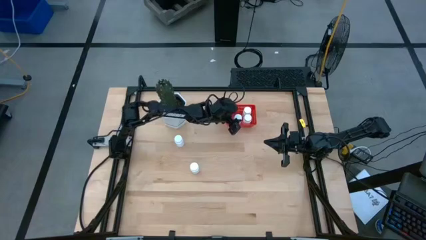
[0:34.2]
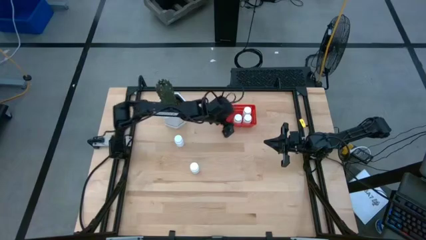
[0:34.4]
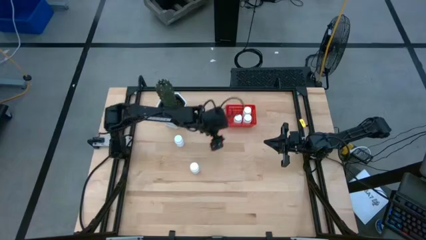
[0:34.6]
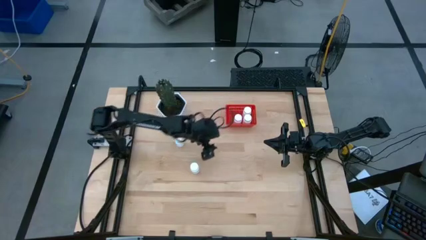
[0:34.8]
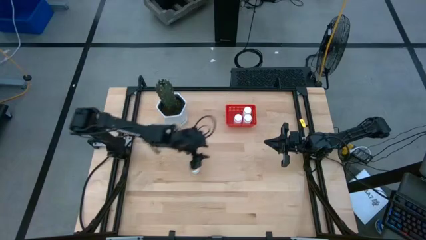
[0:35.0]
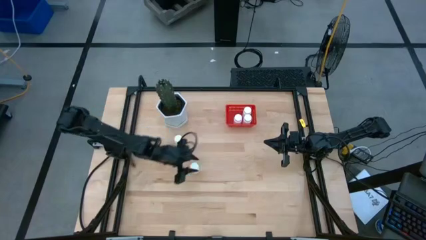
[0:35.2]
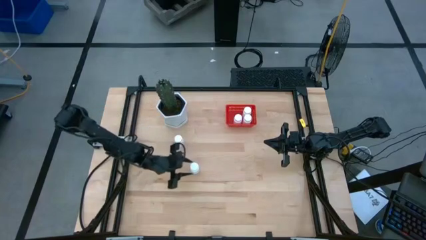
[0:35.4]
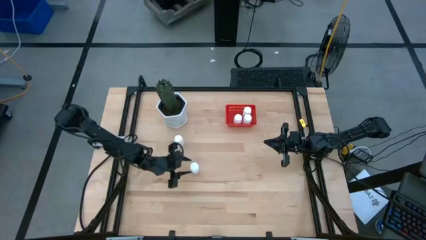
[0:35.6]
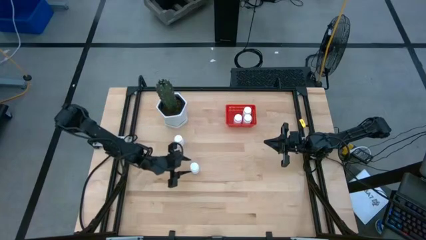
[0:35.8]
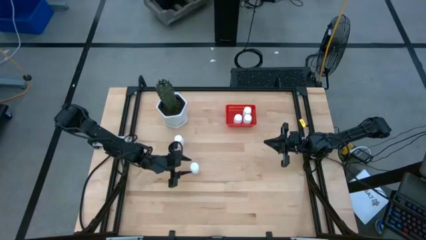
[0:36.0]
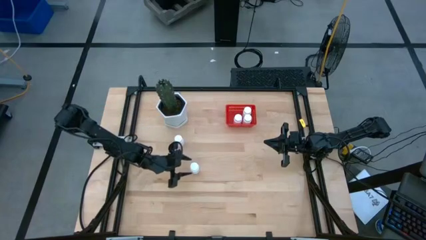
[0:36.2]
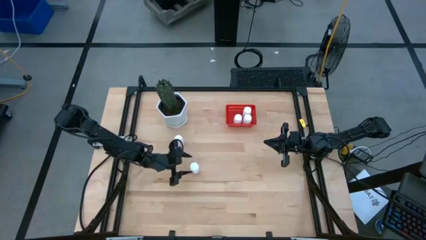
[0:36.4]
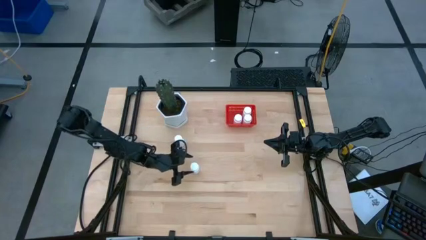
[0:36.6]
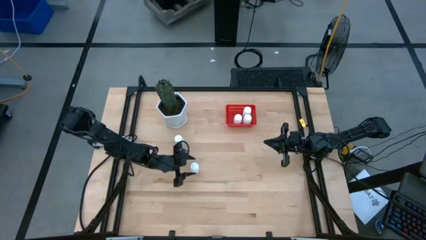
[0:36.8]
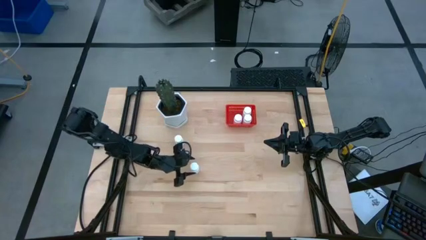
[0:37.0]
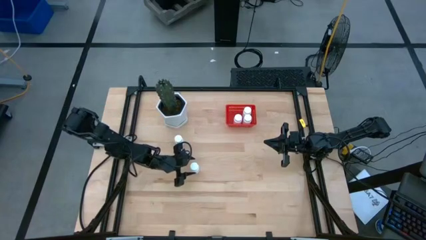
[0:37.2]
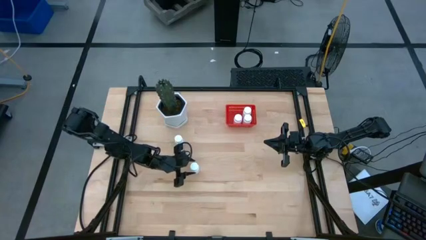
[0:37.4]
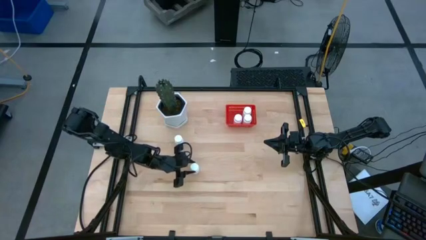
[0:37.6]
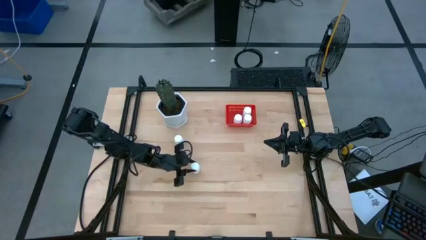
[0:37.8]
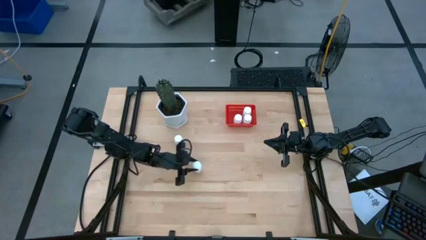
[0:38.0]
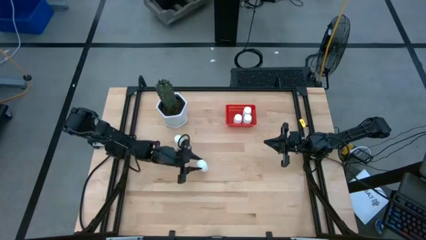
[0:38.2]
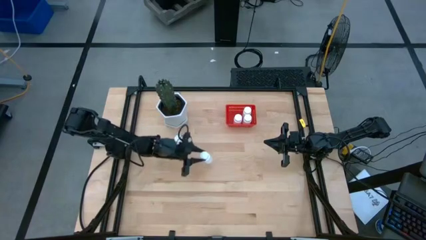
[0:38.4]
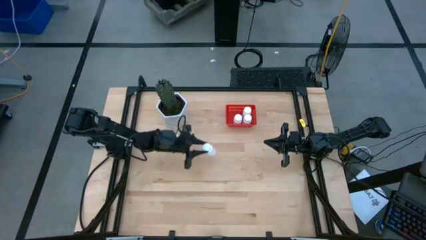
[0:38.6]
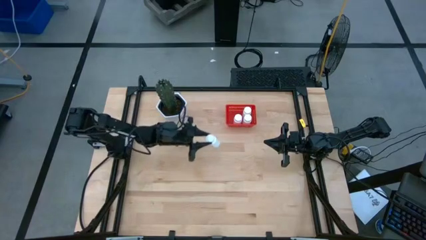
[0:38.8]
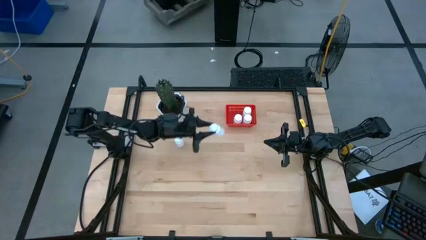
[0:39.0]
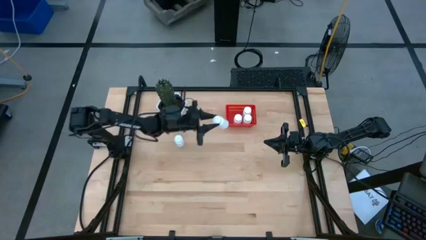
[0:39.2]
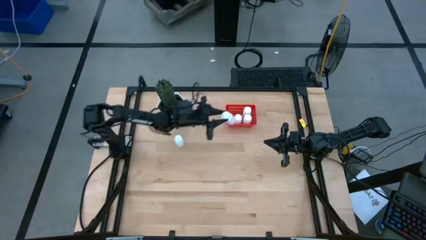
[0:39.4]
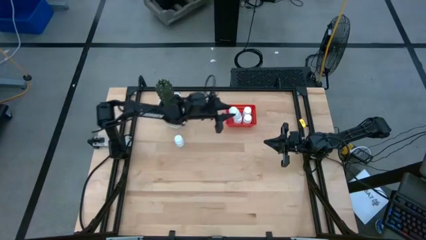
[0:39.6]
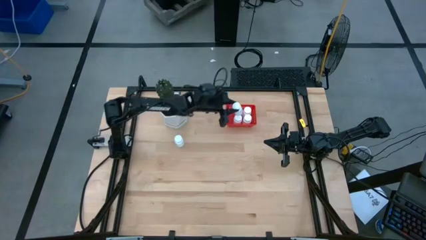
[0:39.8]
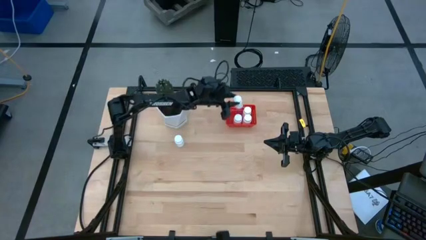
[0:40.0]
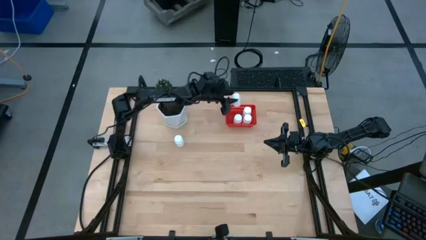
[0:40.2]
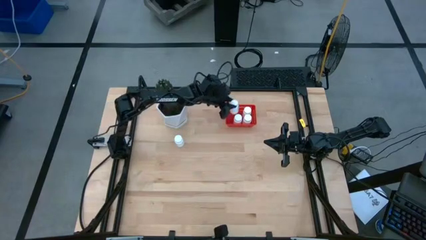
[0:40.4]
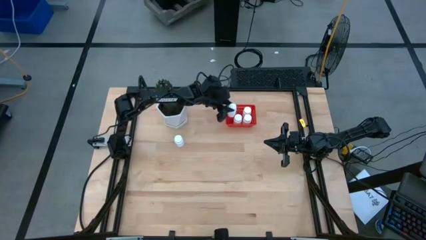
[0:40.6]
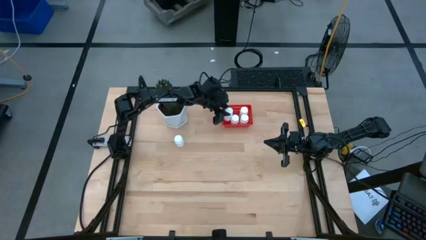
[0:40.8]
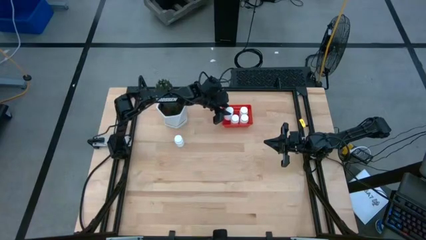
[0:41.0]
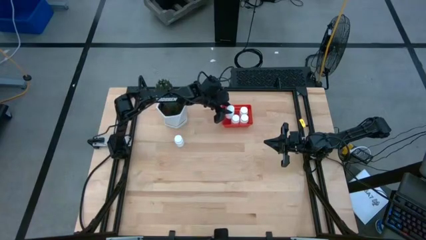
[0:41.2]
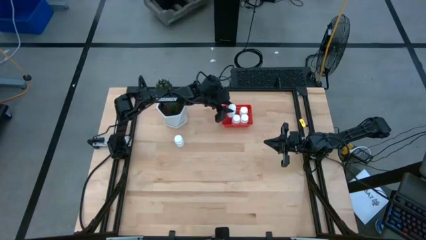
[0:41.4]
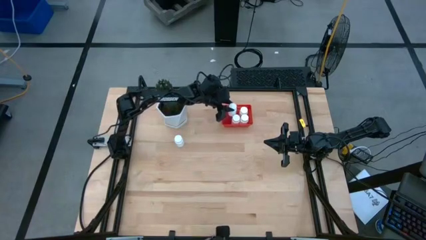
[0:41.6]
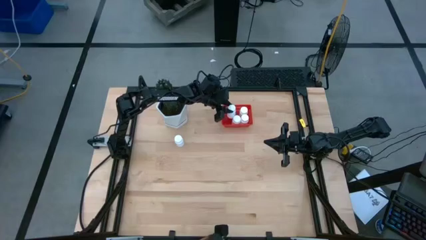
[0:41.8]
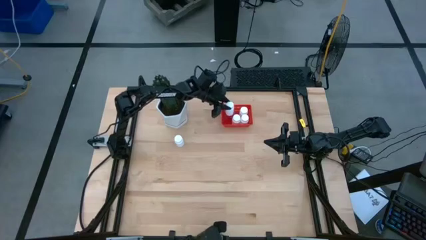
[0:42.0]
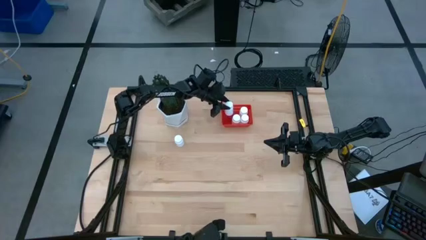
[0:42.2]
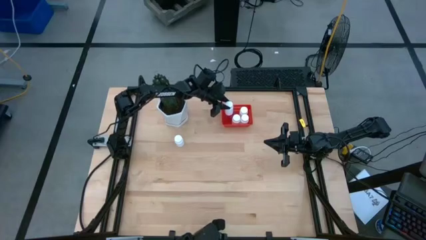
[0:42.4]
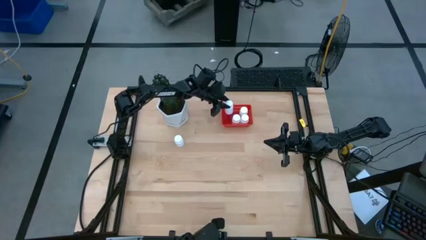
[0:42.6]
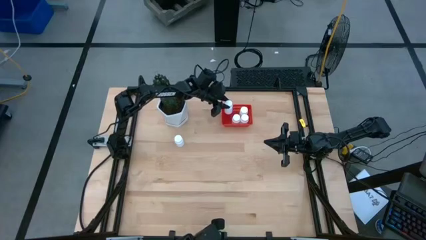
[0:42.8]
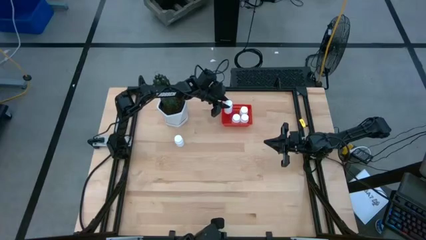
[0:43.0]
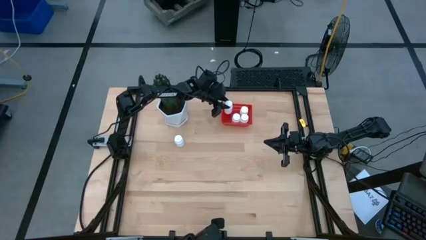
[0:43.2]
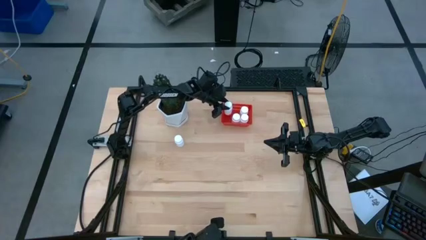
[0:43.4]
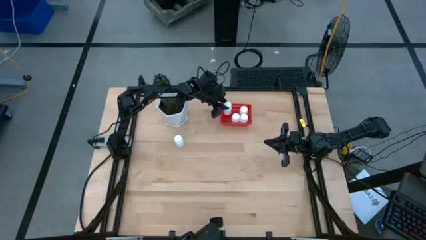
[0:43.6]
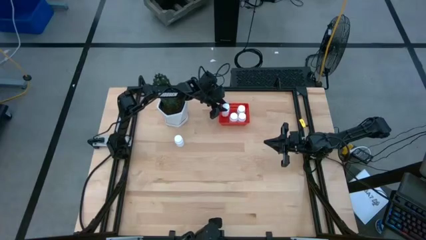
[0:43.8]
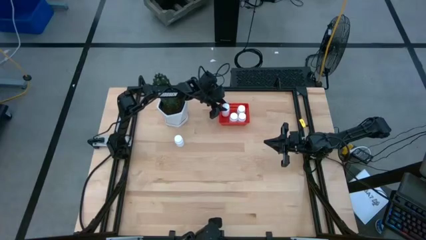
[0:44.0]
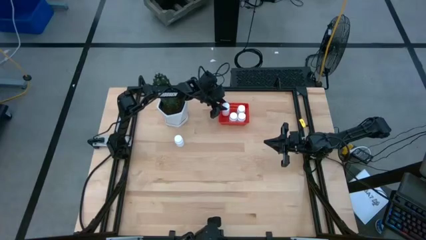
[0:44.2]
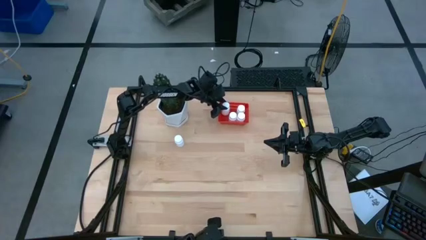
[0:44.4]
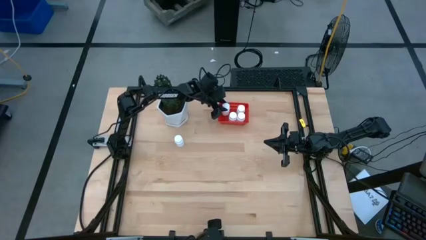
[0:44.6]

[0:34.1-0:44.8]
Task: Pick and place pill bottles into a basket
Put the white pill bottle into the red bin

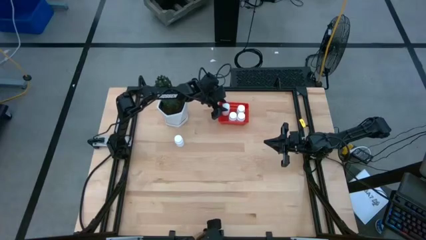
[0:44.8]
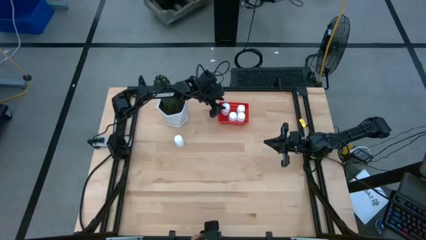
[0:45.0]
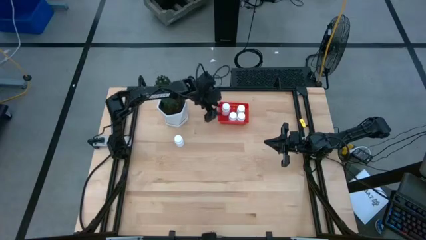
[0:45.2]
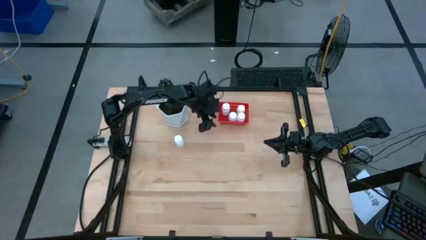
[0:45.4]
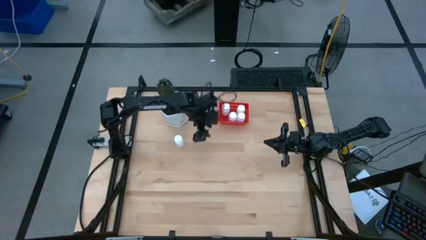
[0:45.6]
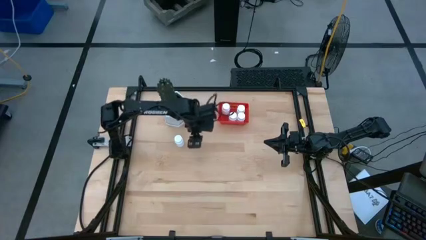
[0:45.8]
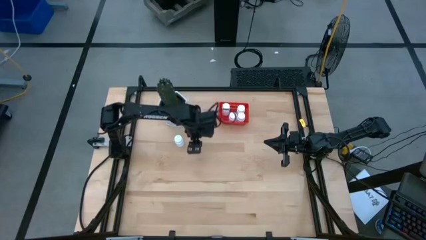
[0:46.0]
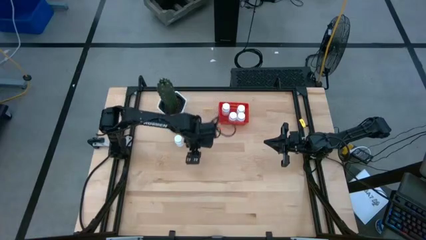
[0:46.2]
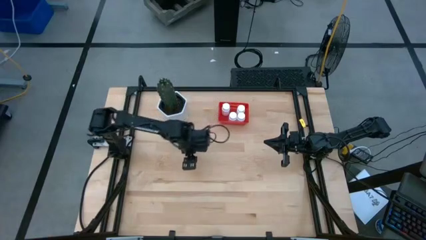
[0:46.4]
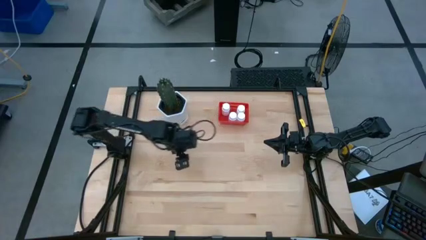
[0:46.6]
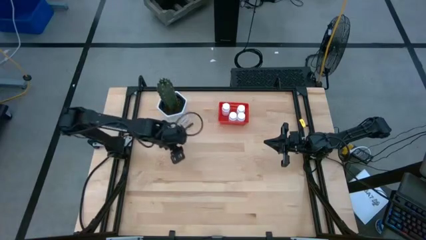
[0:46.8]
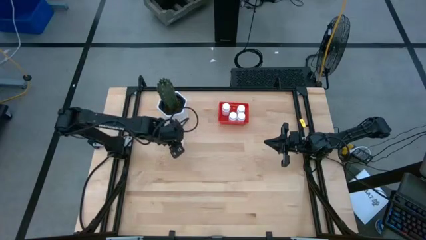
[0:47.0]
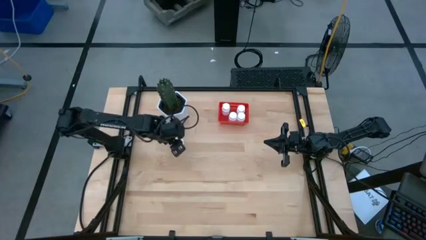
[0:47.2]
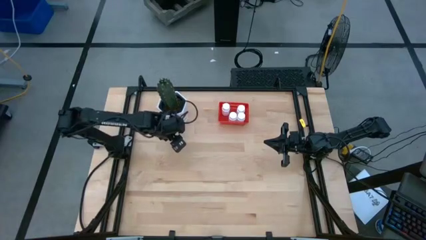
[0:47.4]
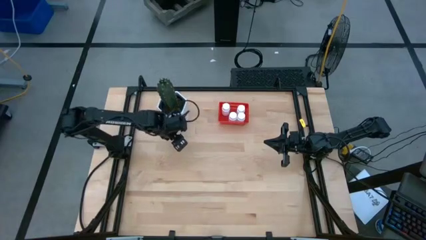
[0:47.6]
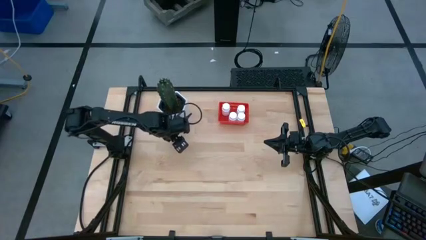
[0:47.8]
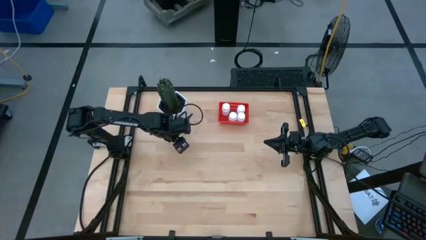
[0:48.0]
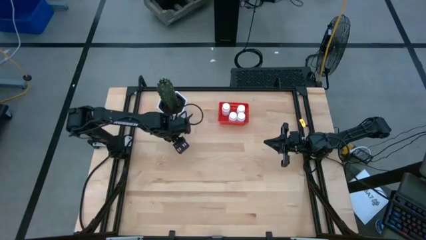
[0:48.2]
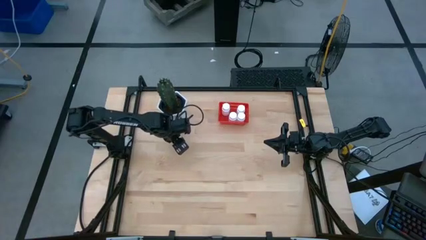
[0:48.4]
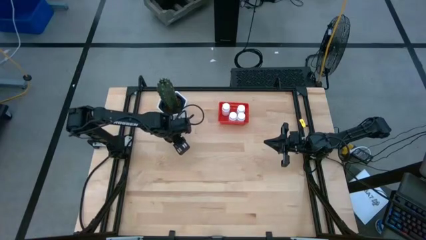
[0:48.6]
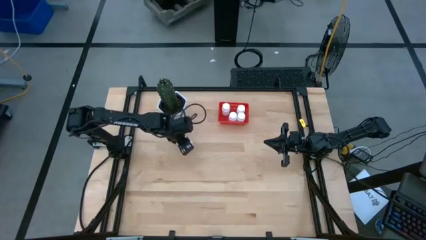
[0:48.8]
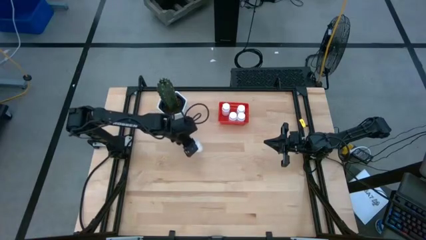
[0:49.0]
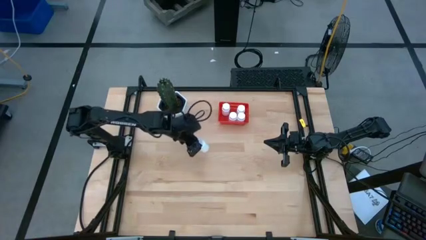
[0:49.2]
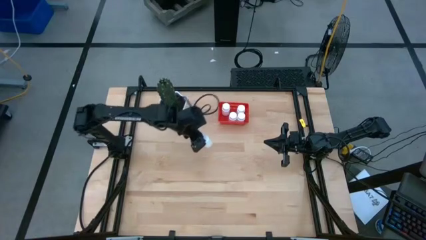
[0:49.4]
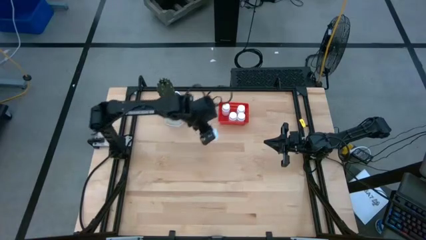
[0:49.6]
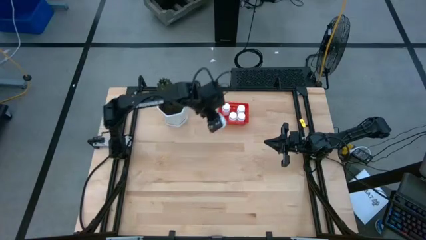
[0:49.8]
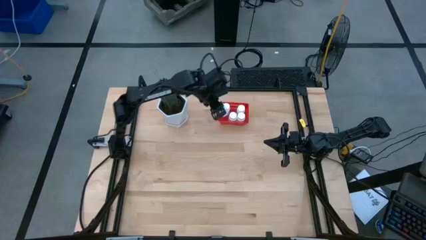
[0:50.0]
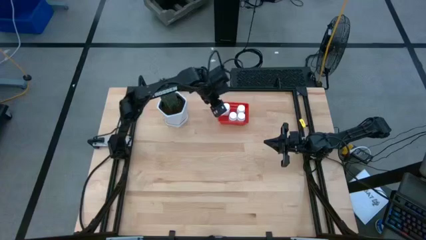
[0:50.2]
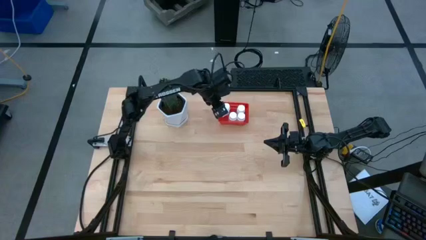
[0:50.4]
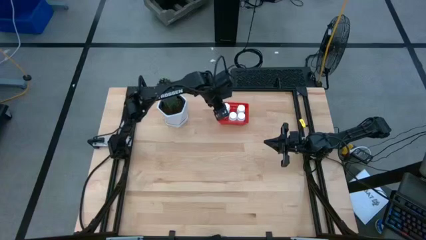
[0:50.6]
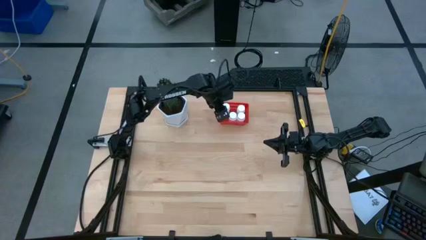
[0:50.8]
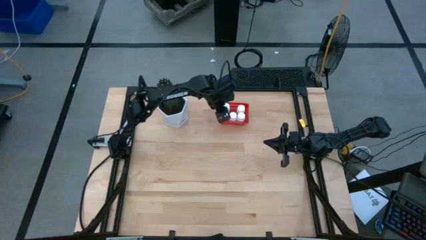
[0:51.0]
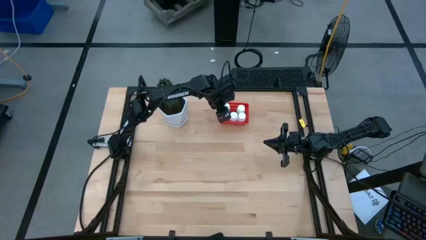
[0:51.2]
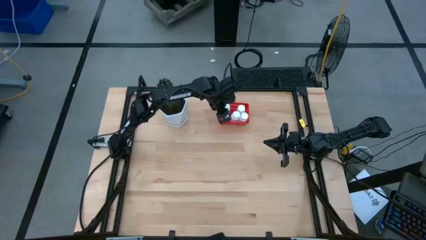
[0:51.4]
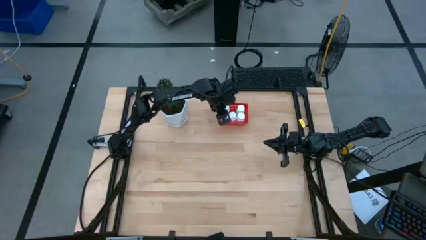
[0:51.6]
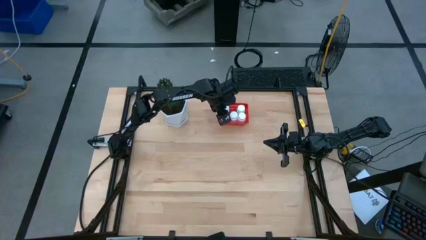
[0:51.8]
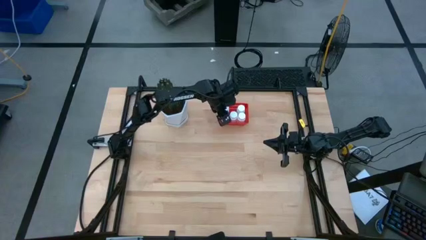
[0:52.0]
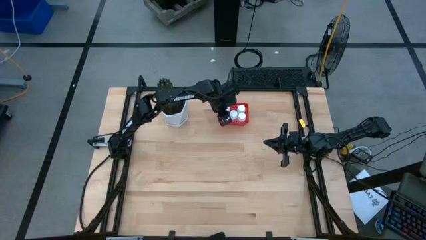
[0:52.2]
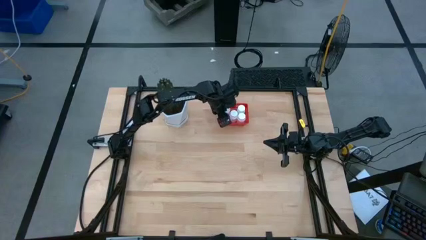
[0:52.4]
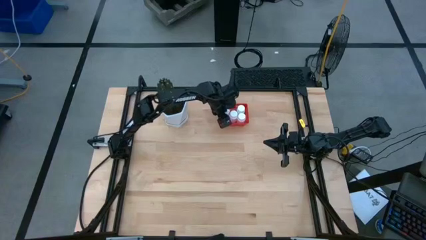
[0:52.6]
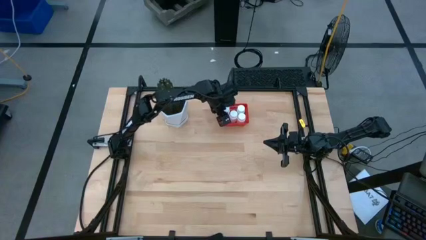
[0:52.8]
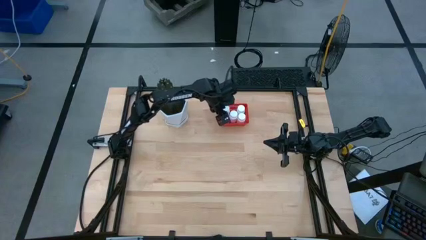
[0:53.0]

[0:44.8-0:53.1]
Put the white pill bottle into the red bin
